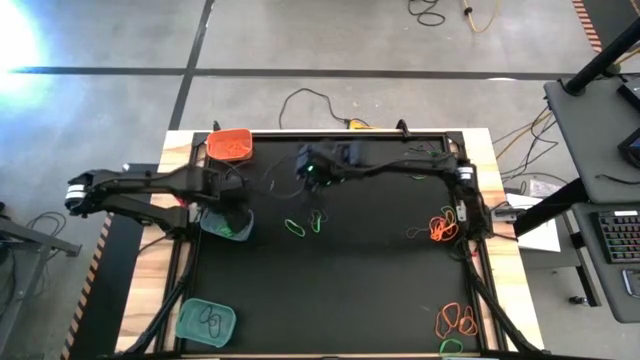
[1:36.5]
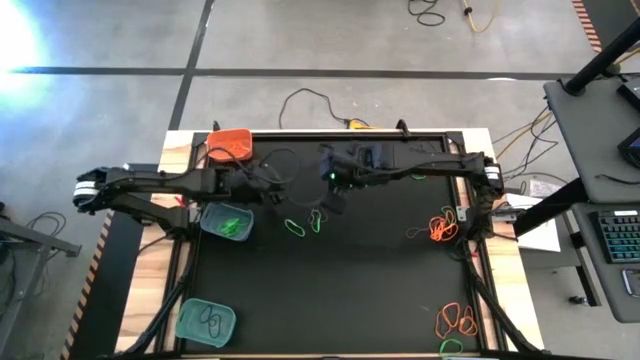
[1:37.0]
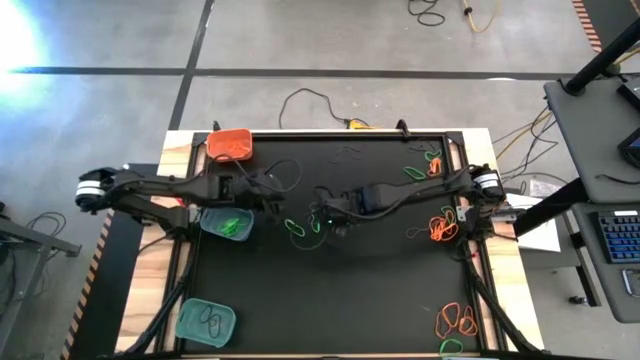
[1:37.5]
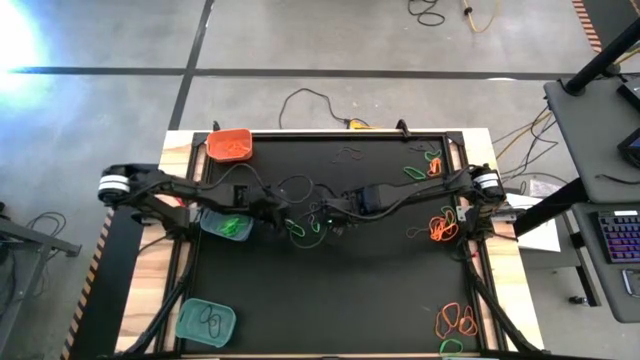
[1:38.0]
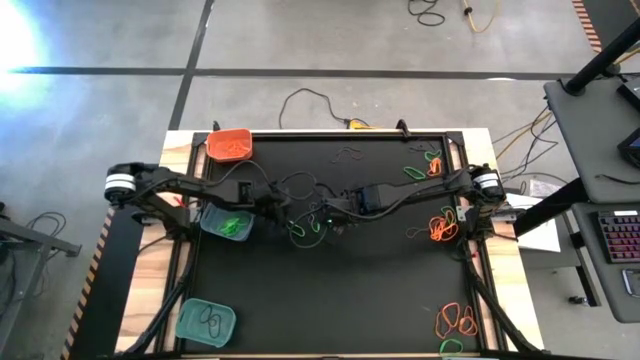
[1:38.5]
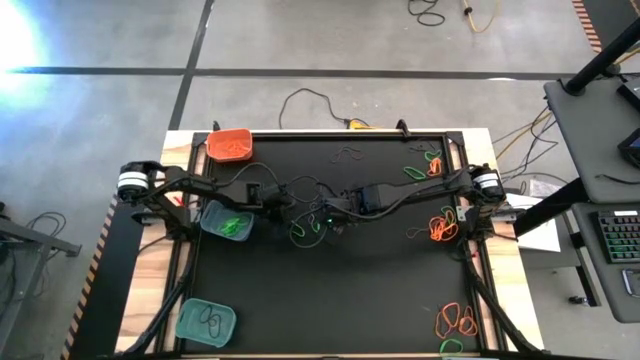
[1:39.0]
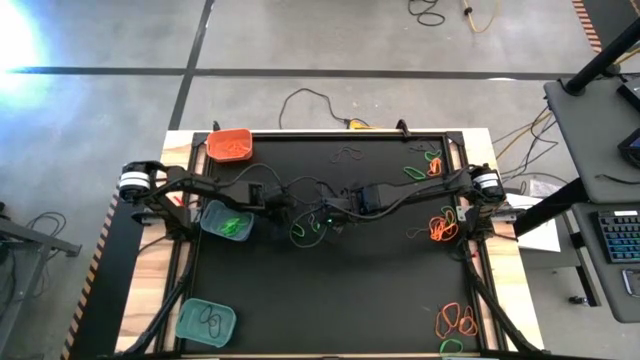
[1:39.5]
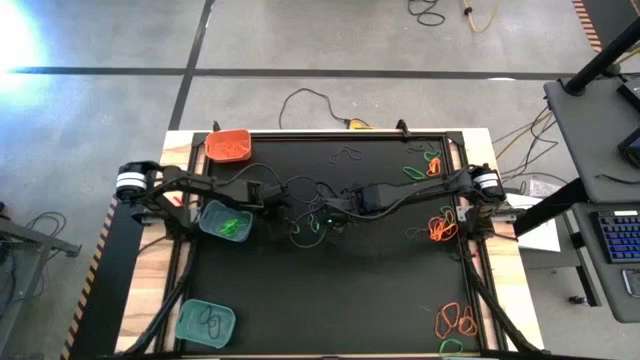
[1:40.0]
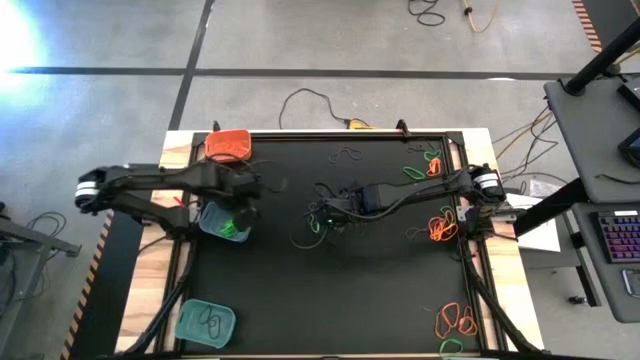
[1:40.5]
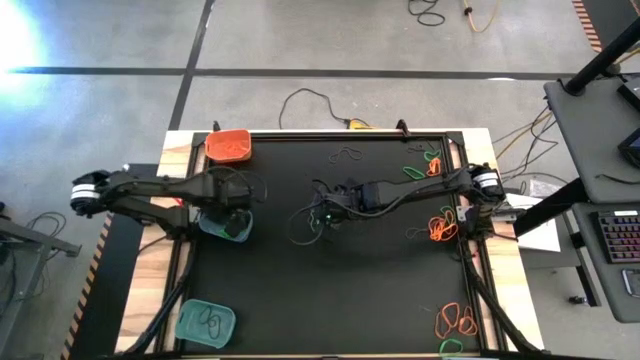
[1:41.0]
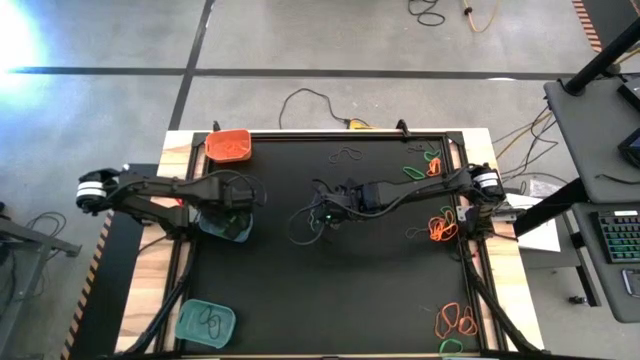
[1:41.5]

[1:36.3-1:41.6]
Task: Sort rubber bands into baskets
Put the green rubber band into the blue bin

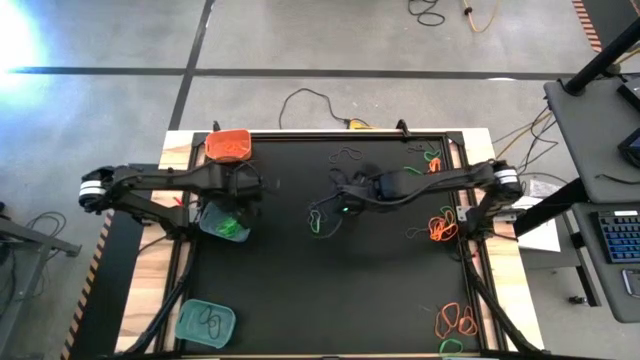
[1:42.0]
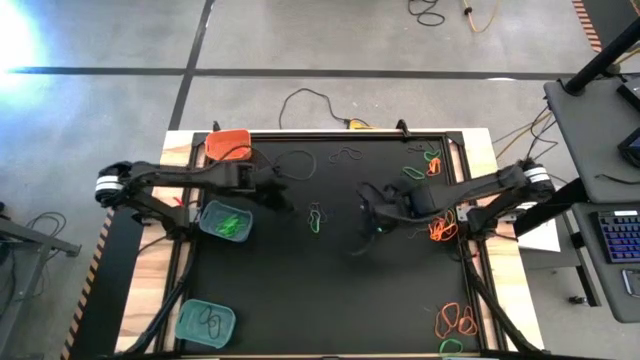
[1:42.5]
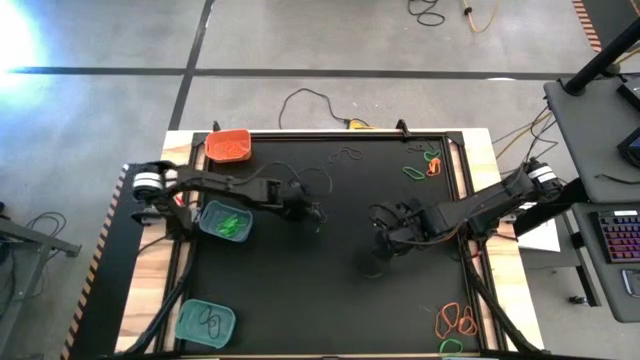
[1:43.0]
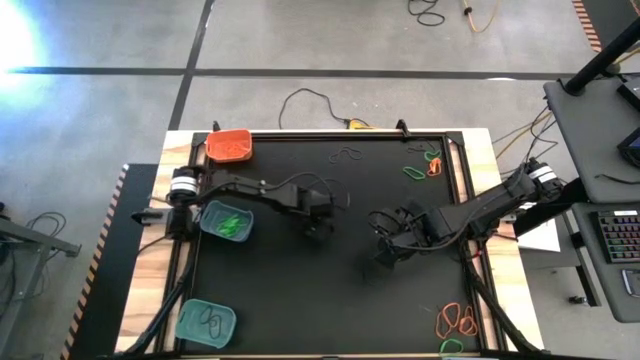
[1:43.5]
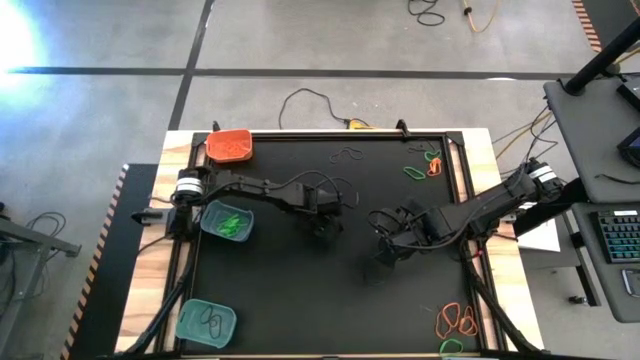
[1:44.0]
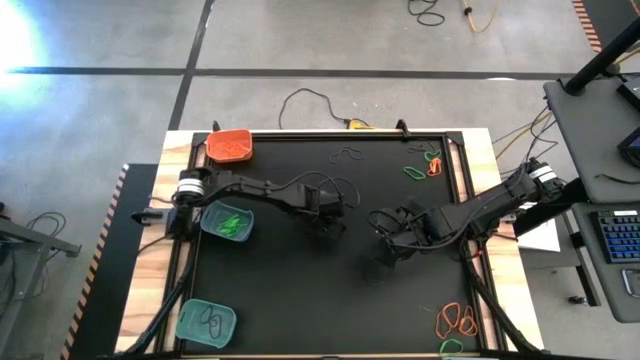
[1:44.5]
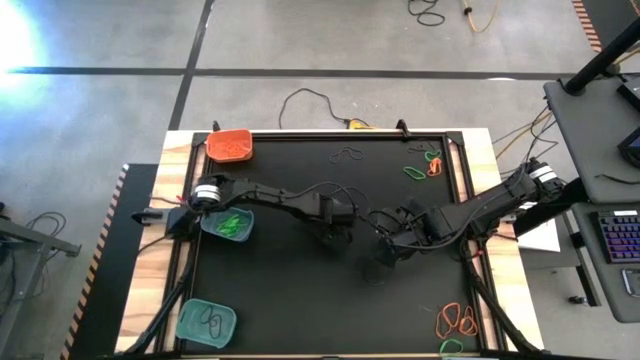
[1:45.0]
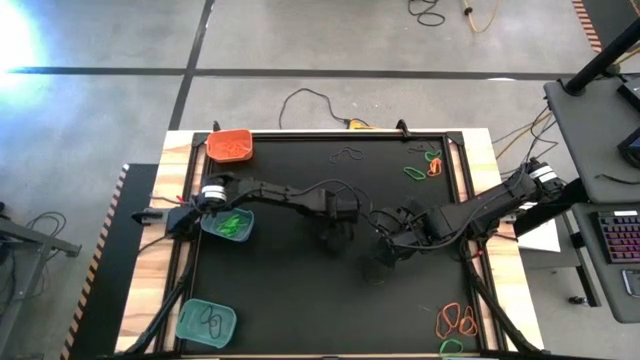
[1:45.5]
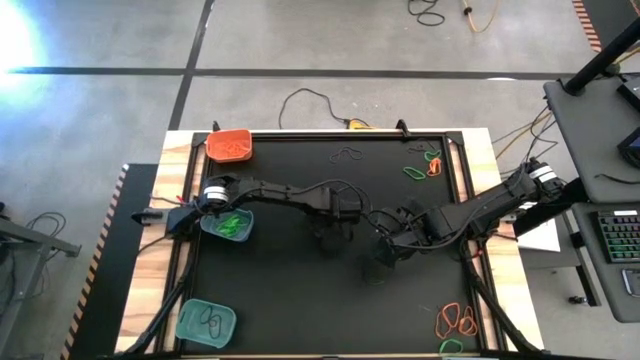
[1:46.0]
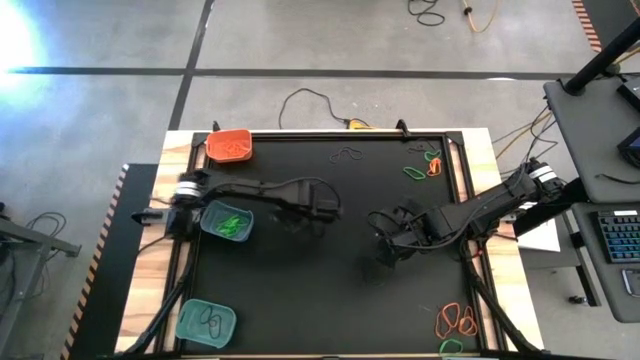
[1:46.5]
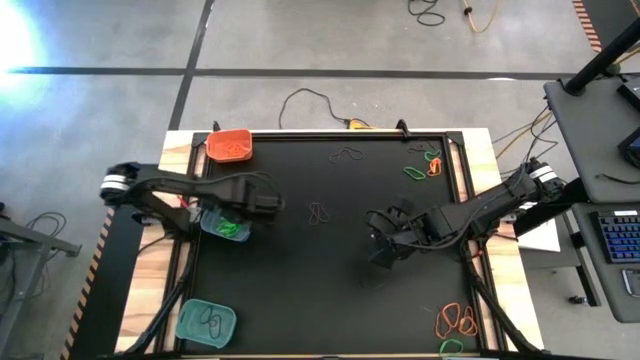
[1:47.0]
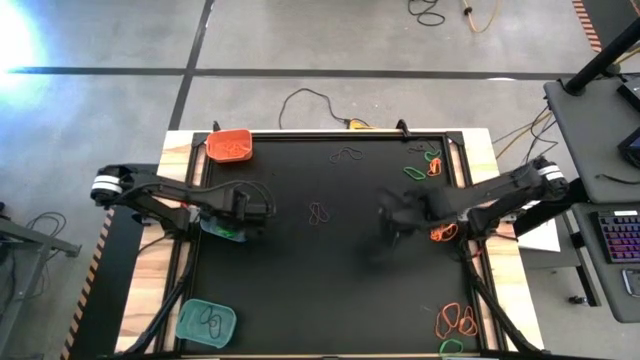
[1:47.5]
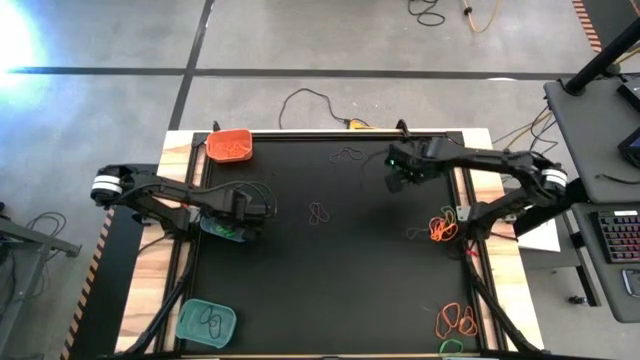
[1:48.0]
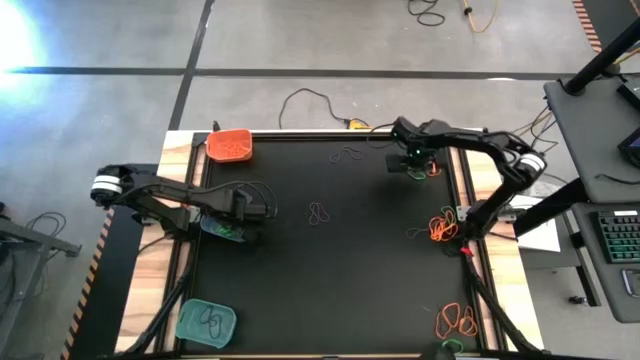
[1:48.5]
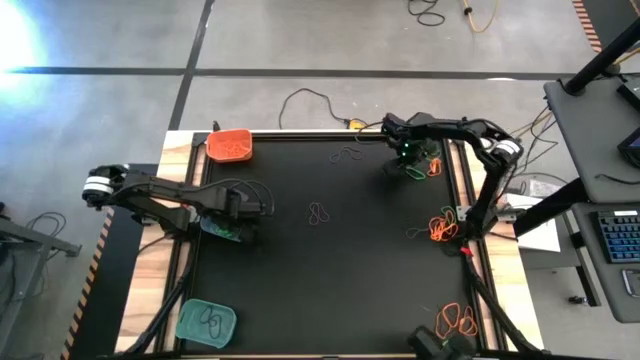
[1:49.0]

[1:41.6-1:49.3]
Put the green rubber band into the blue bin

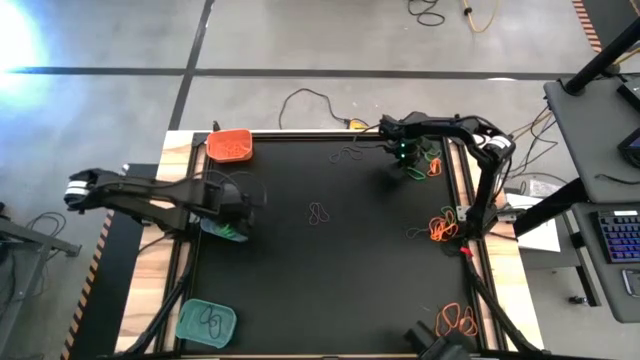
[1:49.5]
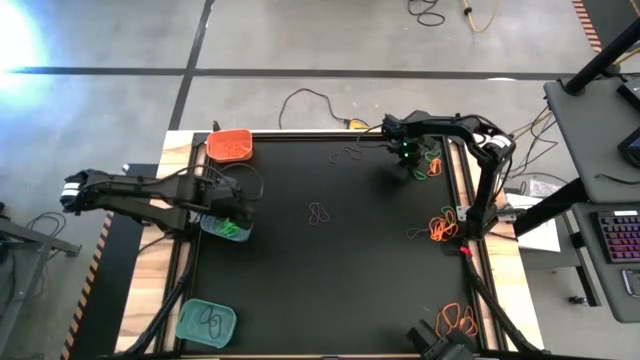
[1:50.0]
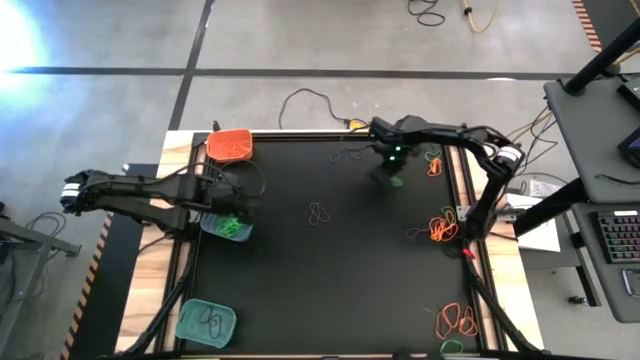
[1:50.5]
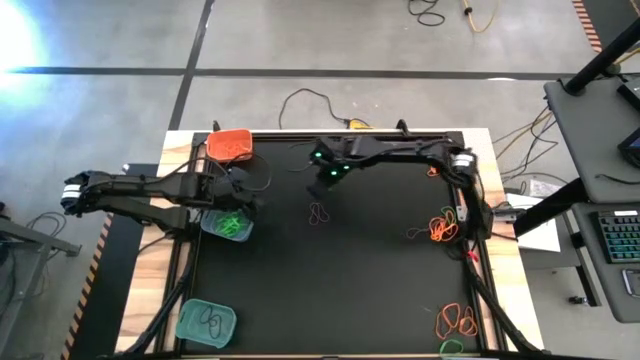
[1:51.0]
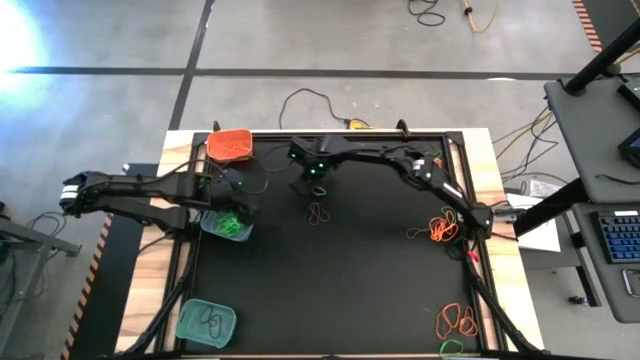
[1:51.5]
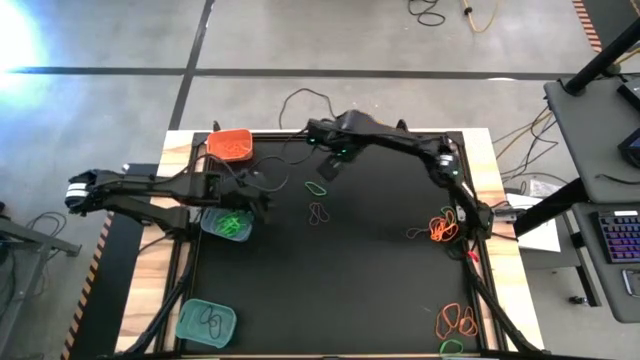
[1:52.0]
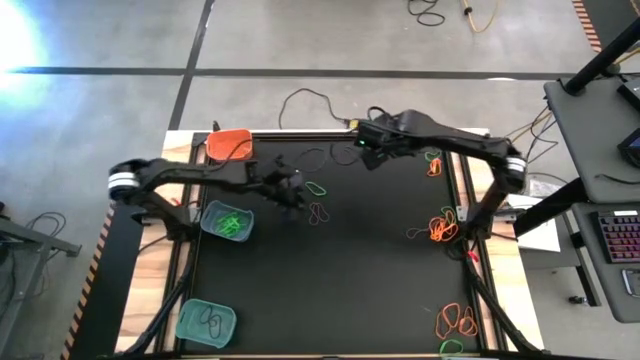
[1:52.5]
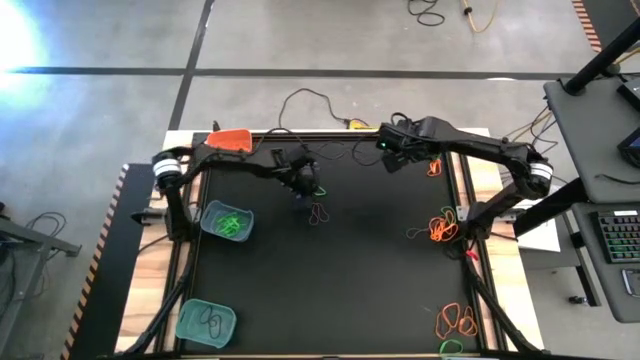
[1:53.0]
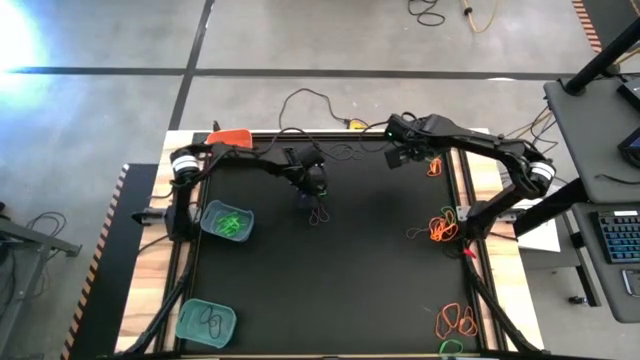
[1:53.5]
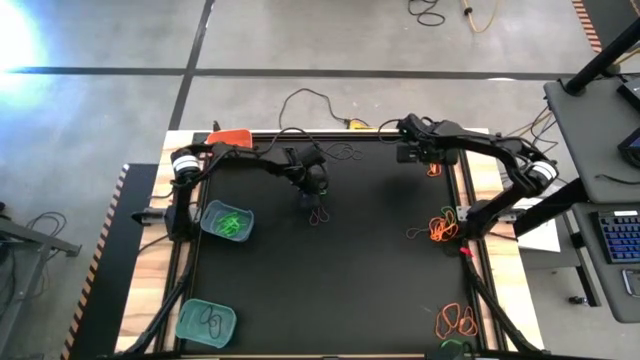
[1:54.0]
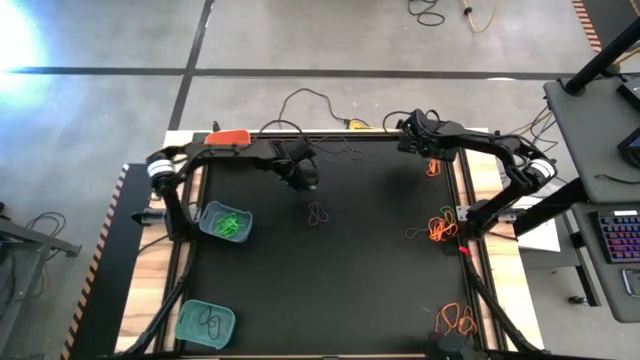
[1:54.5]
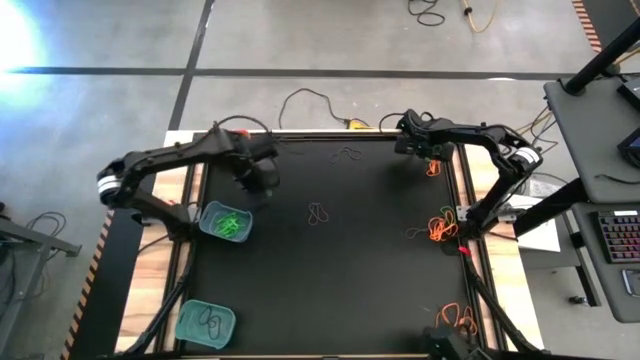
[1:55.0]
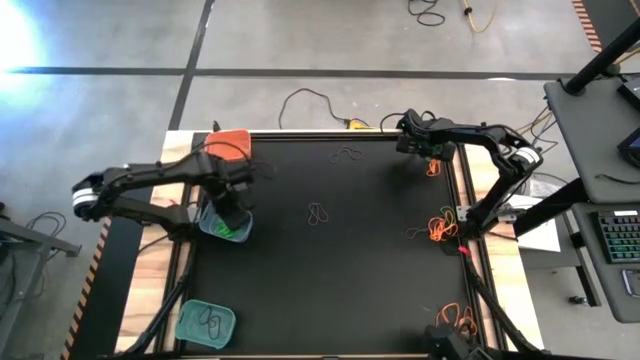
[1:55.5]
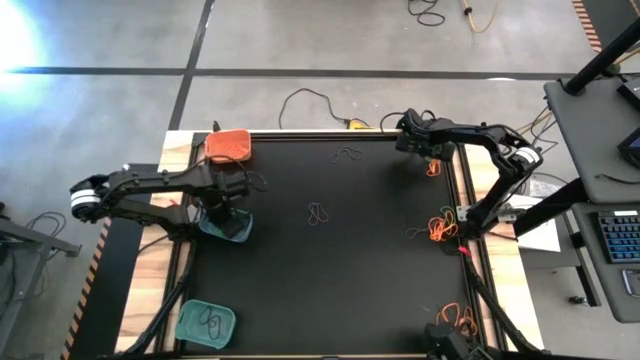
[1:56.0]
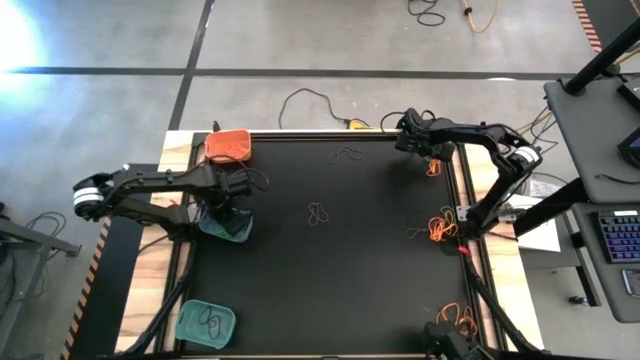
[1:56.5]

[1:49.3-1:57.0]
Put the green rubber band into the blue bin
